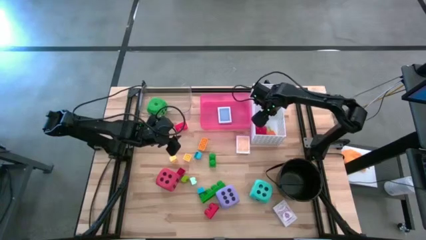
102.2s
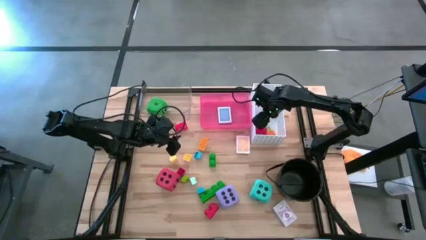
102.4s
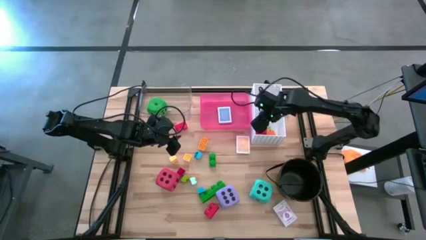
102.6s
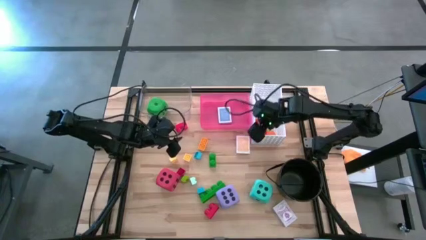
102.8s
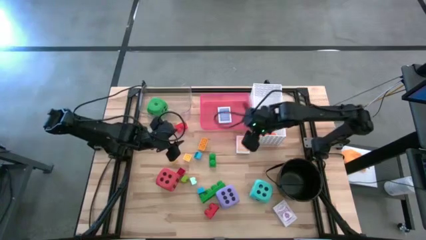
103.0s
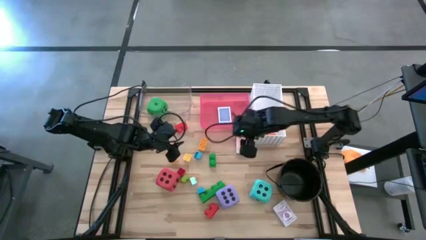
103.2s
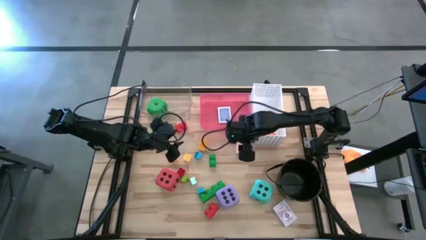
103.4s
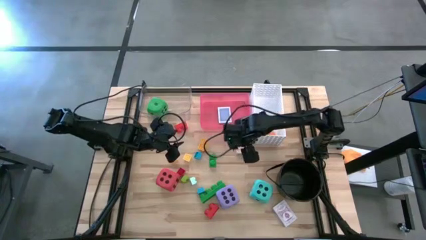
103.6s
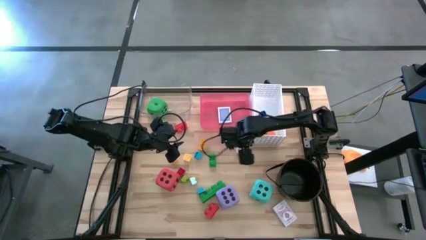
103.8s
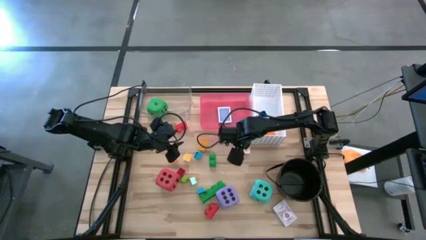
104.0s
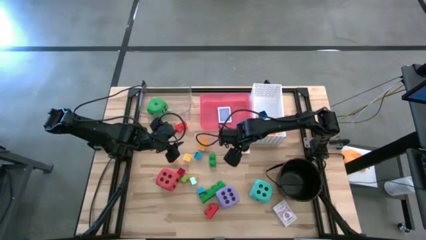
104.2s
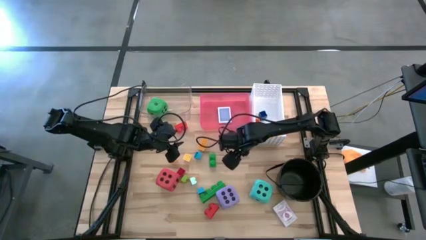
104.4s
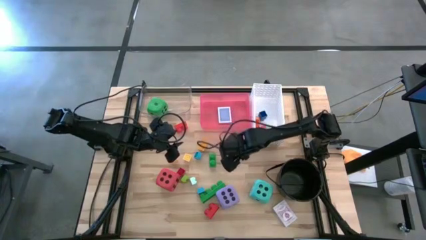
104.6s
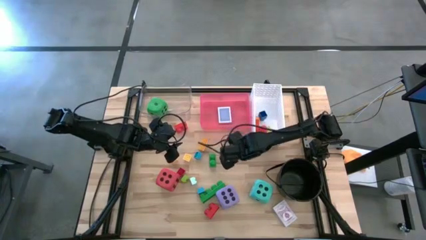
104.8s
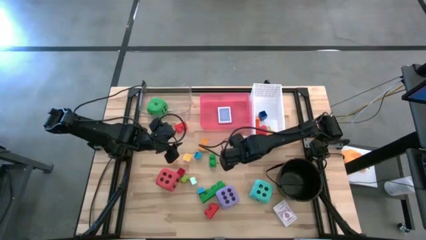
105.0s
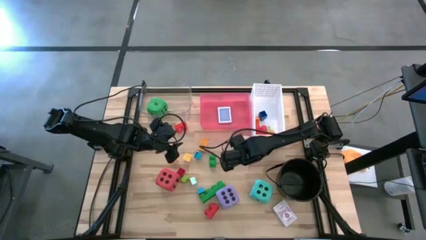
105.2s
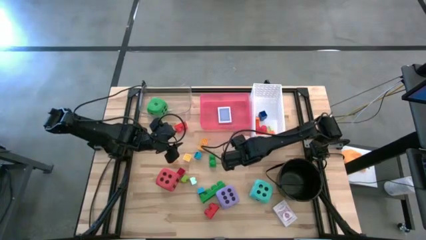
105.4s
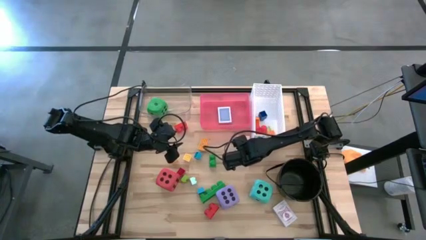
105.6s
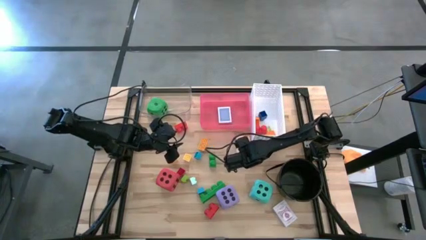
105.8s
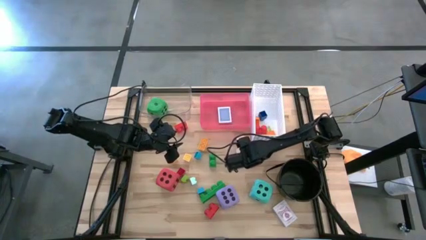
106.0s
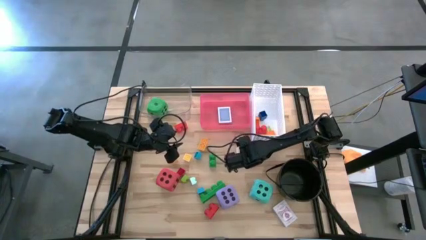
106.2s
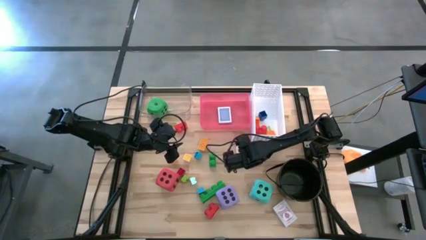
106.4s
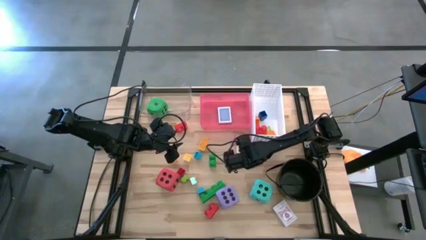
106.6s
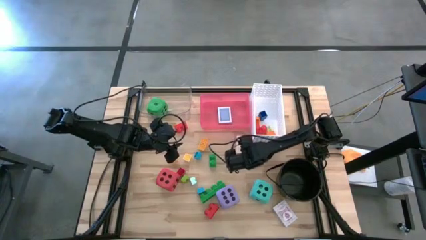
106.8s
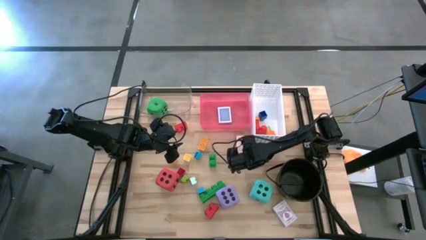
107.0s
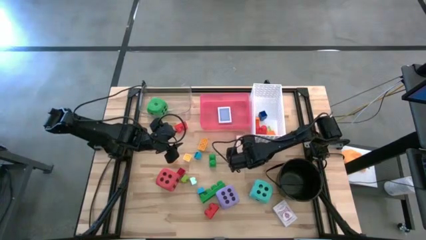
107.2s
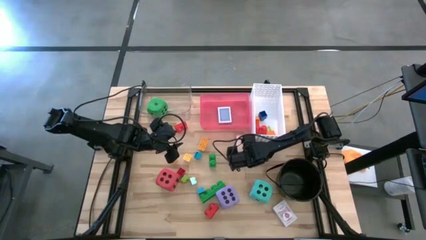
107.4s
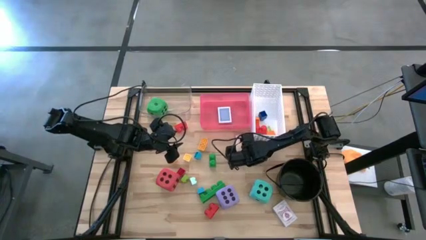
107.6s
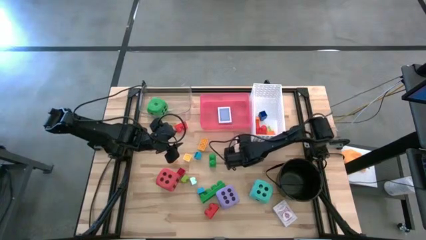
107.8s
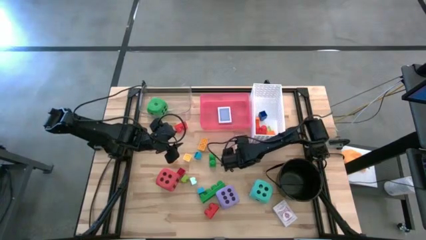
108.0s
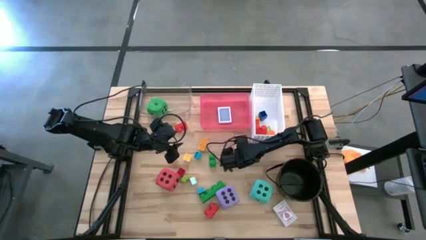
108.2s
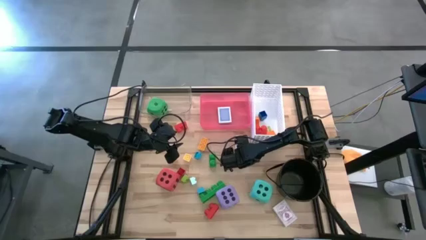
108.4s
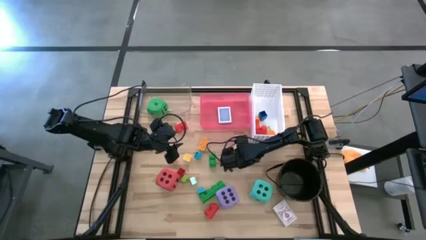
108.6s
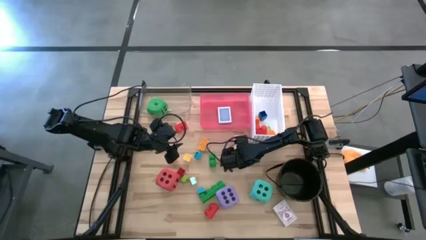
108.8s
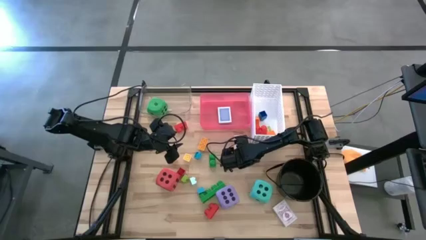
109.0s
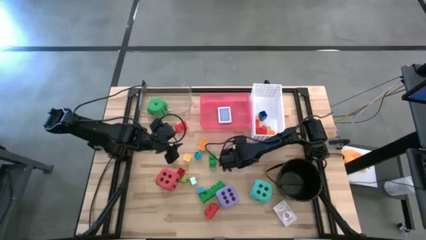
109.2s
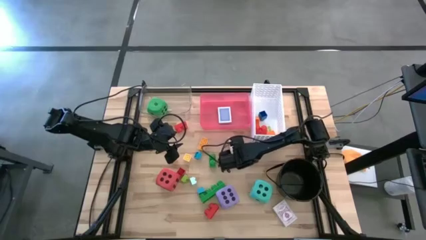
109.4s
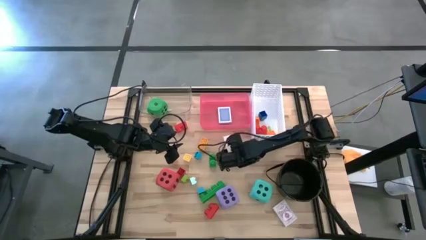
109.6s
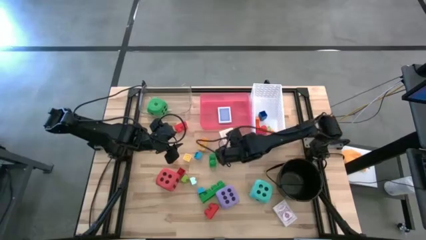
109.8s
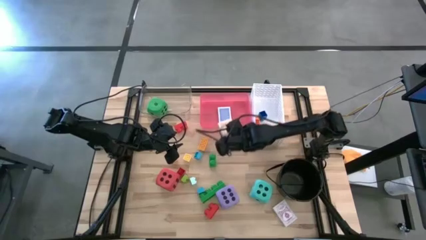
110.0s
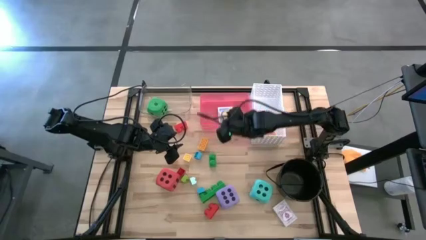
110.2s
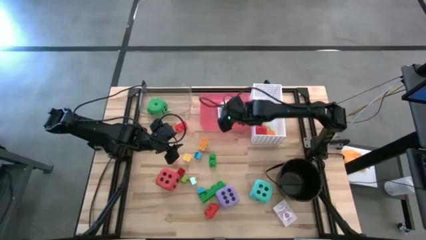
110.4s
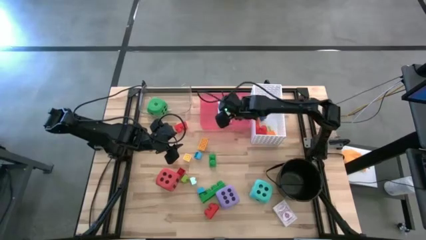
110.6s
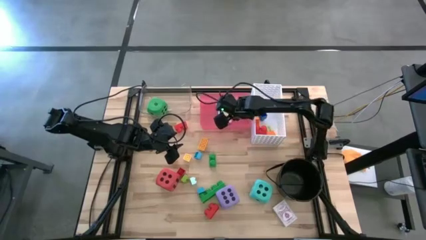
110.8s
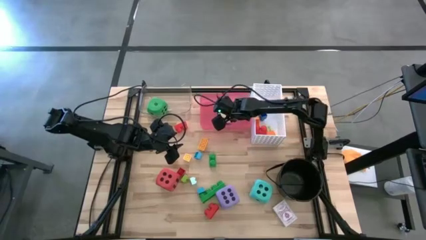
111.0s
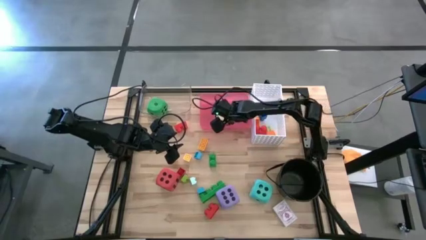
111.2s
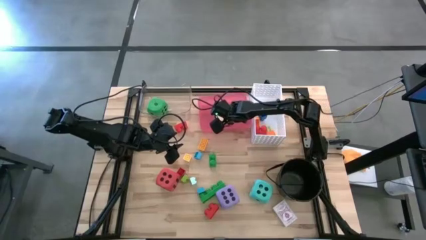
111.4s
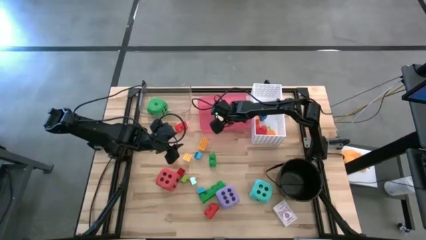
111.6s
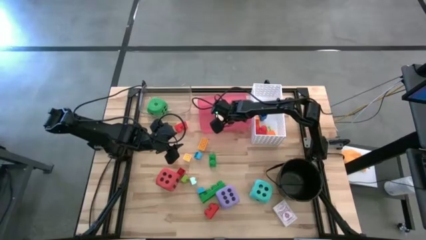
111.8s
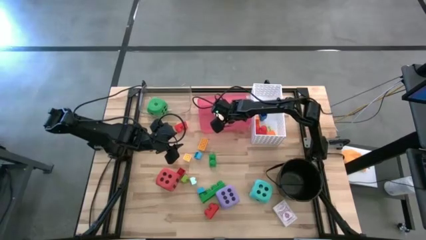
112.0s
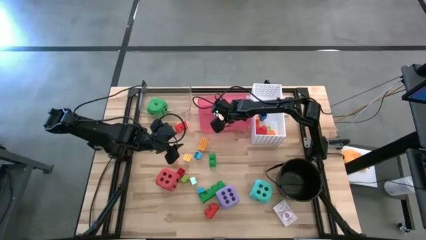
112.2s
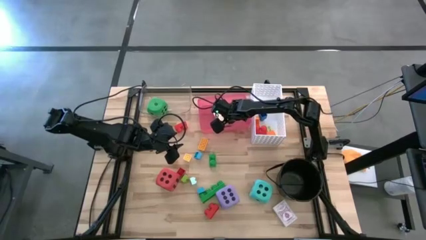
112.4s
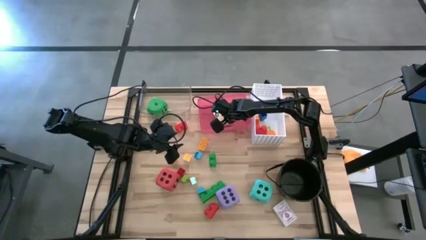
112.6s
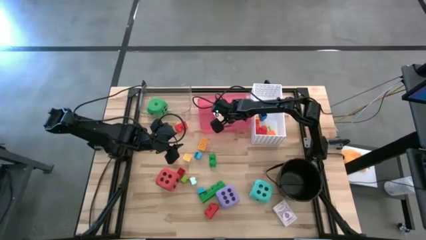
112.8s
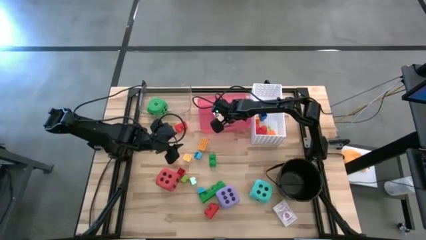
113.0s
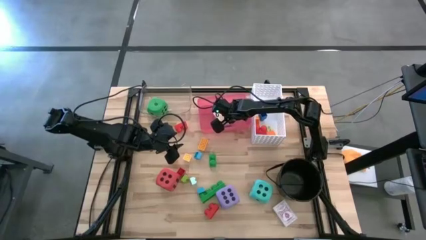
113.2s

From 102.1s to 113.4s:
Task: Pick & Place Toys
Put the yellow deck of cards into the pink bin

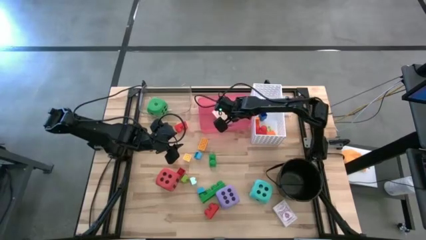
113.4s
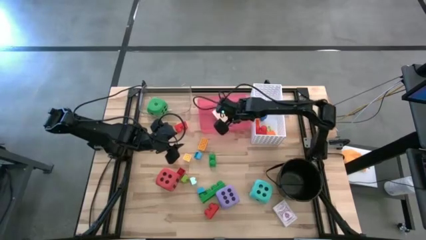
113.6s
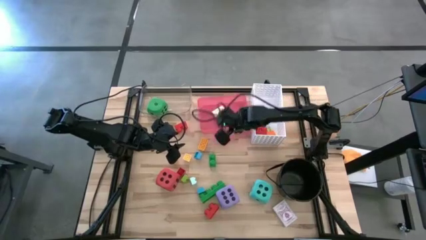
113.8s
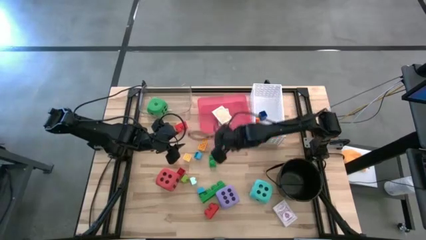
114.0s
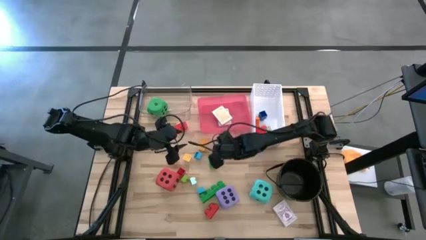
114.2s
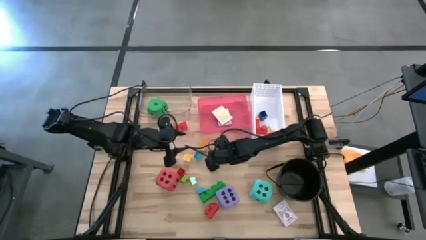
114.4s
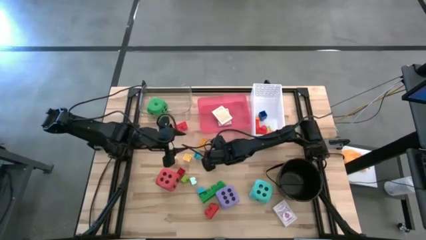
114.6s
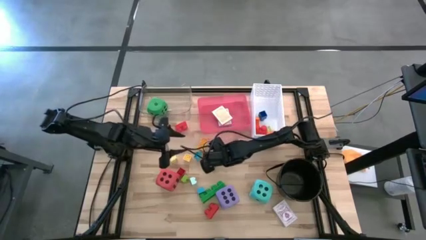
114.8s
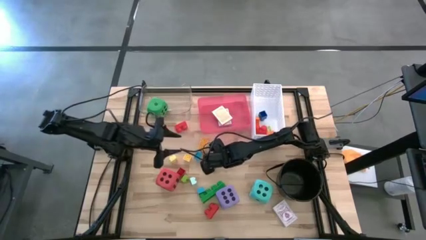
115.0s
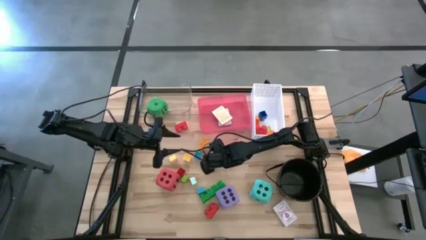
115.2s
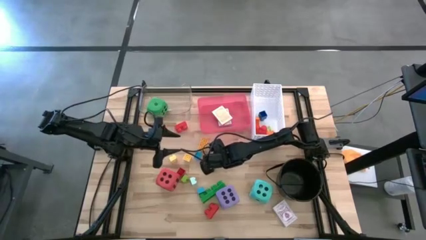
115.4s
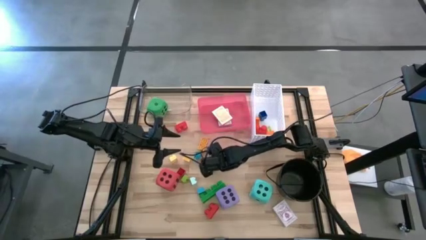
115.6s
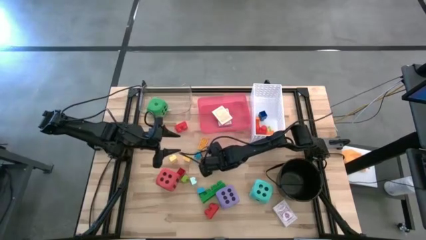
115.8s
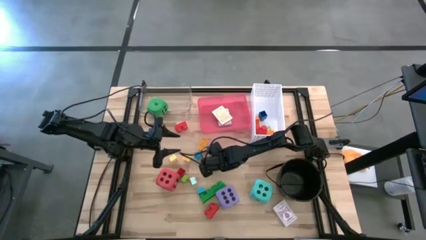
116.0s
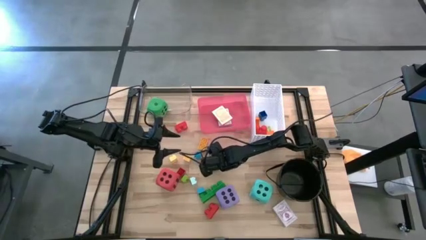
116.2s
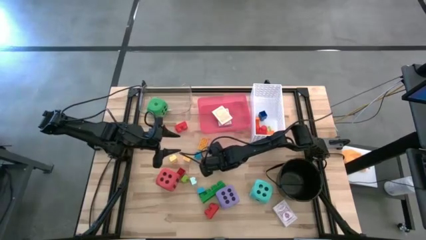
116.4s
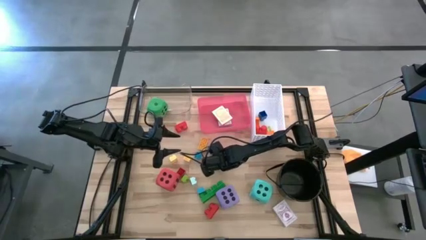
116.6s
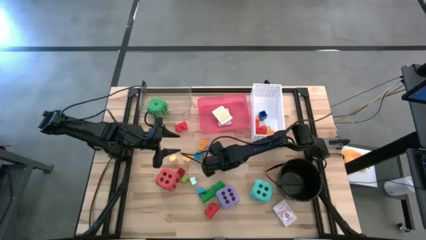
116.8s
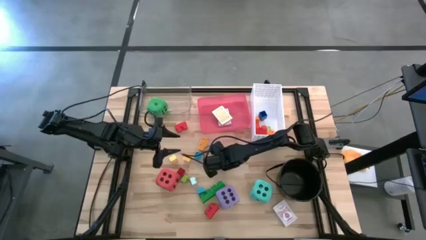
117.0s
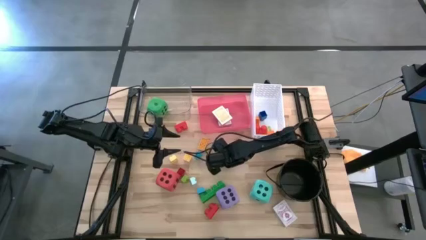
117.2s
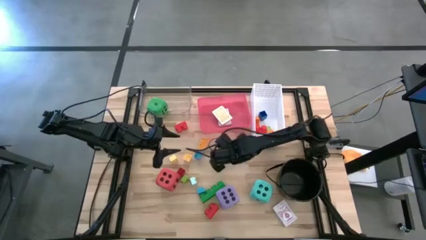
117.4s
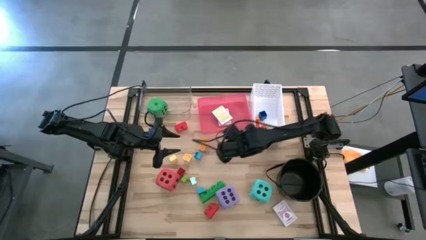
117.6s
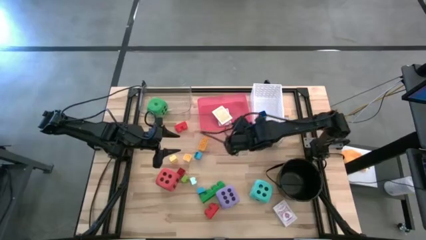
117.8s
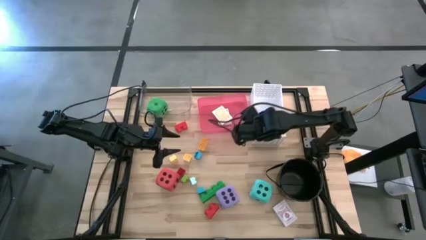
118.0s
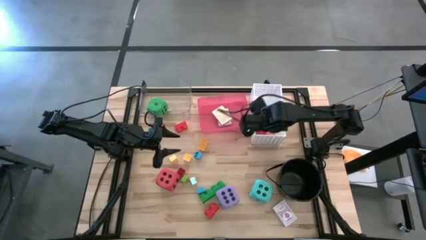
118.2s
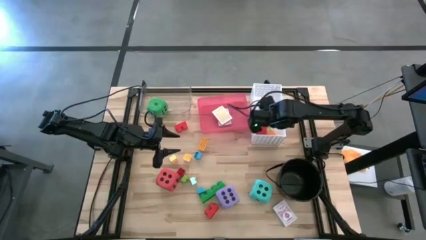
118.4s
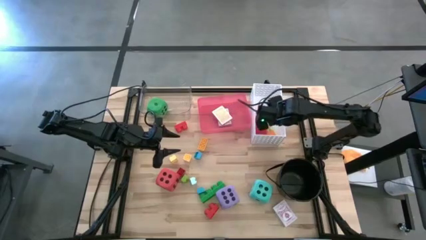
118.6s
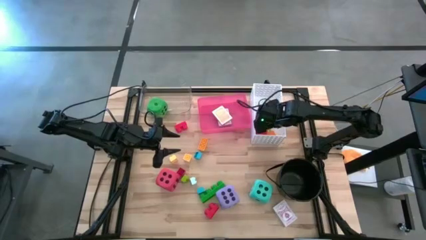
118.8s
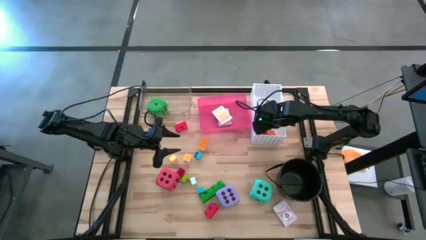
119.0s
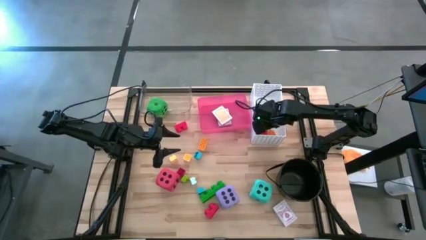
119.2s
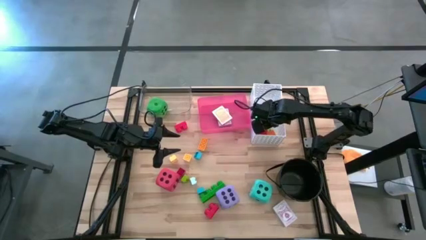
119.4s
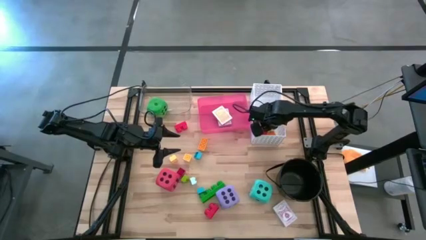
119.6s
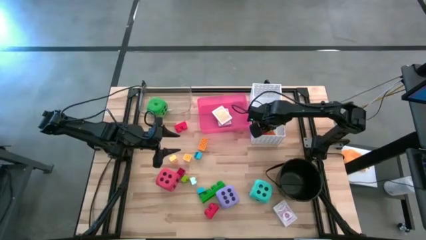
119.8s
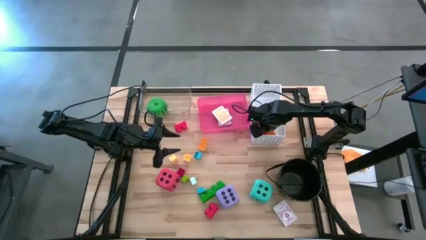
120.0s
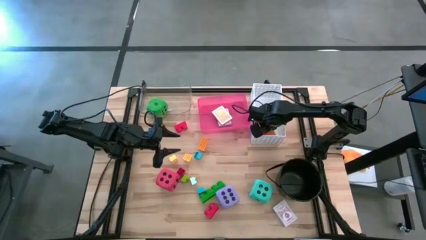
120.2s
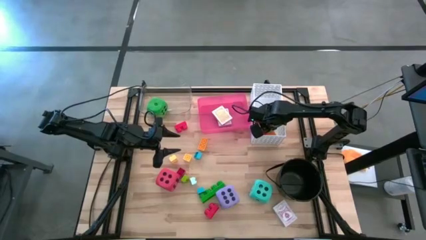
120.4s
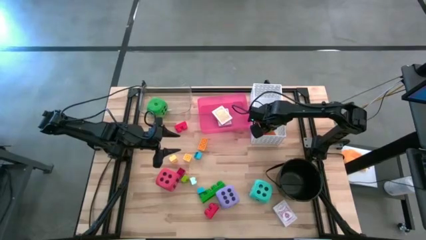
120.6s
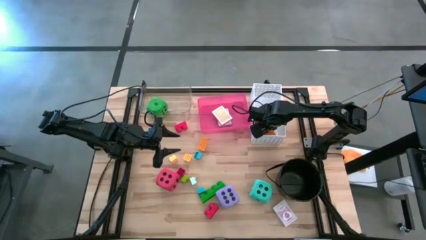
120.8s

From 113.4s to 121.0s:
Put the top large green game piece into the white bin
